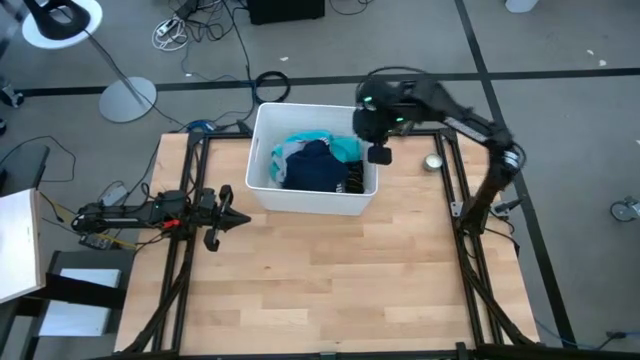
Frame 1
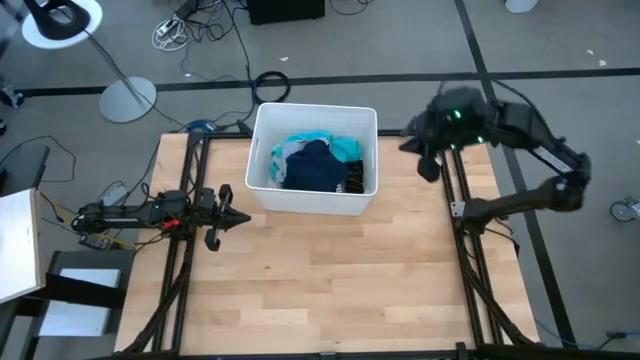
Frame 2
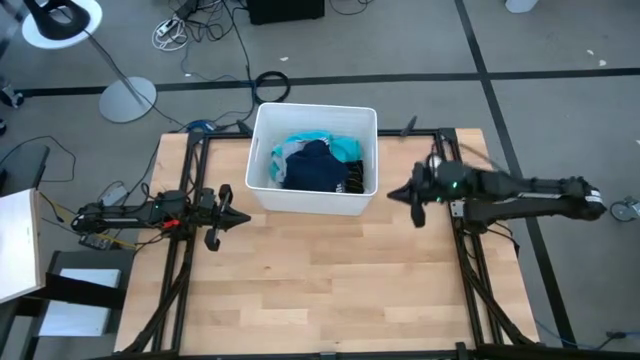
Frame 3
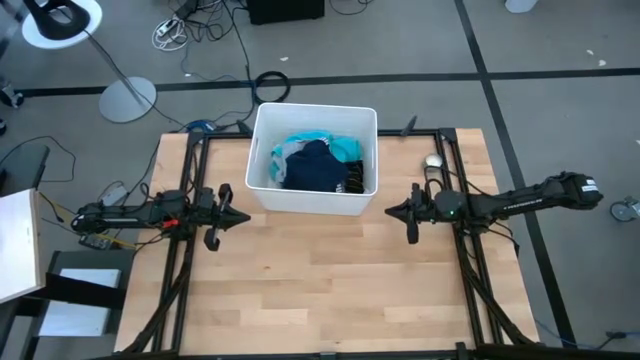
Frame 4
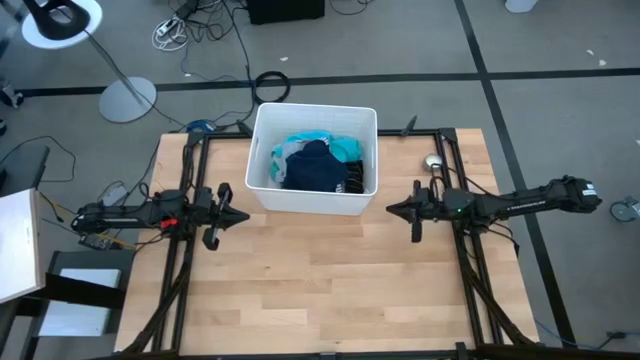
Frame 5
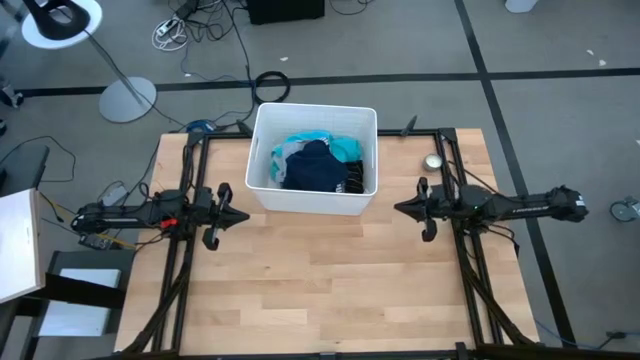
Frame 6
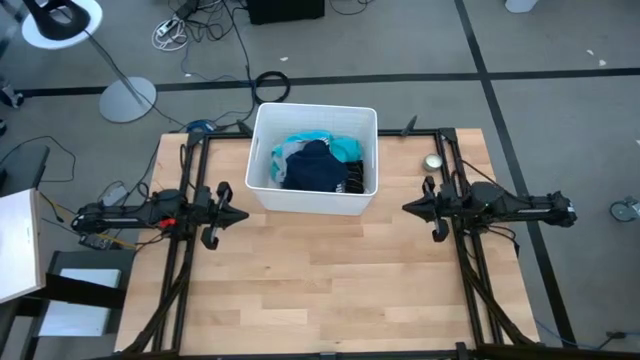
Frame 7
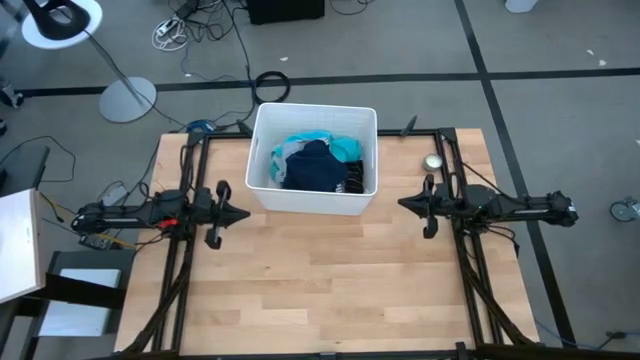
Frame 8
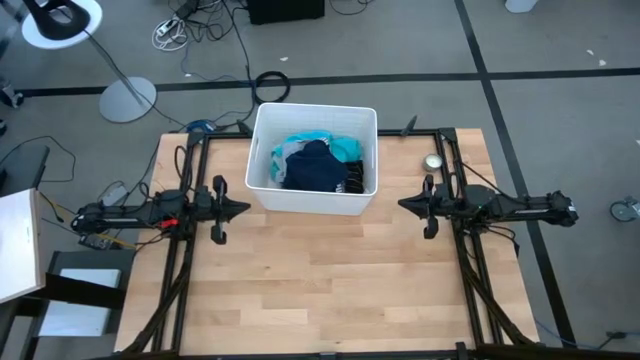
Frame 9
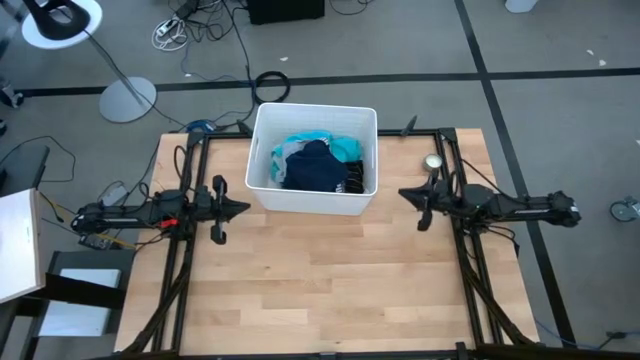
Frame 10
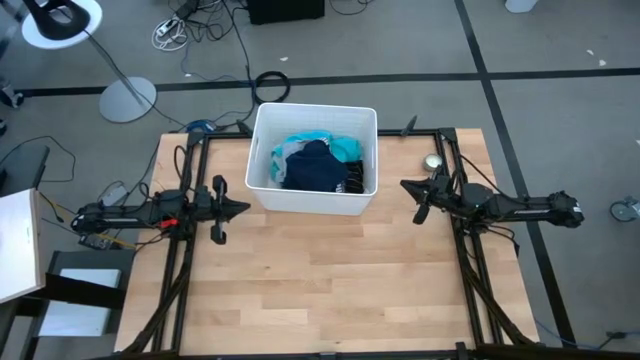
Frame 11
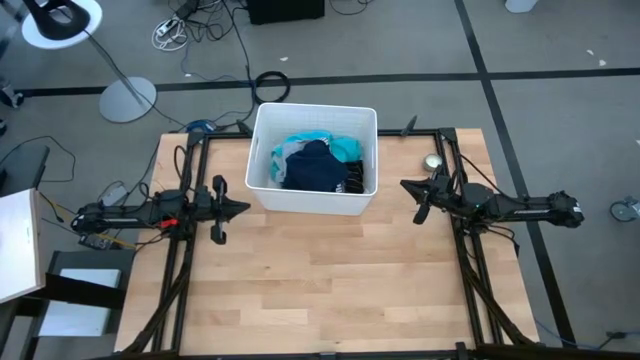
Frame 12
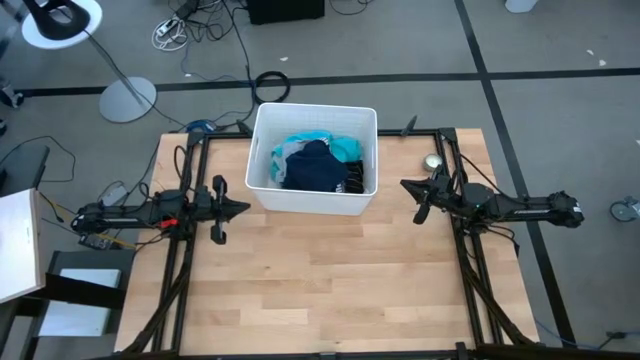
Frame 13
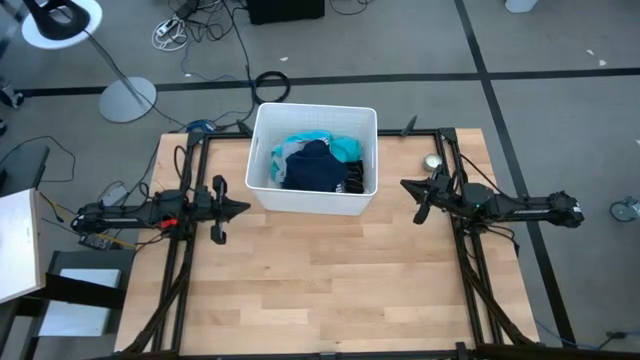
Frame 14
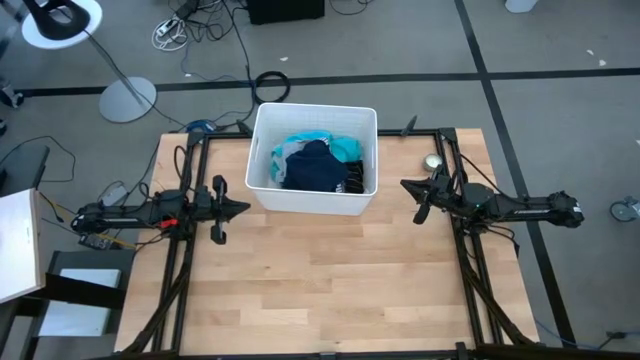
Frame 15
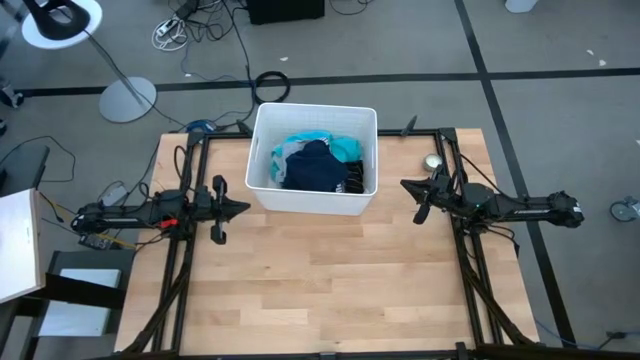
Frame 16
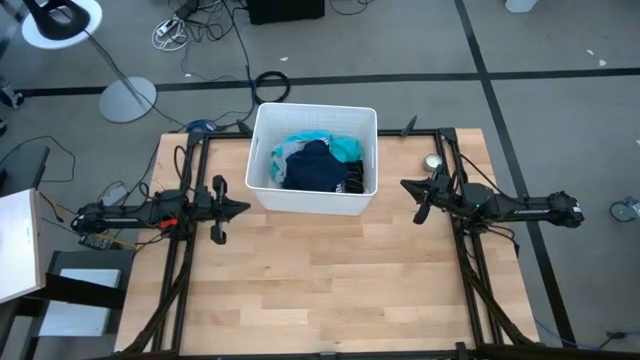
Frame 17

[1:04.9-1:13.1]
Task: Sort clothes
Return to Home Position

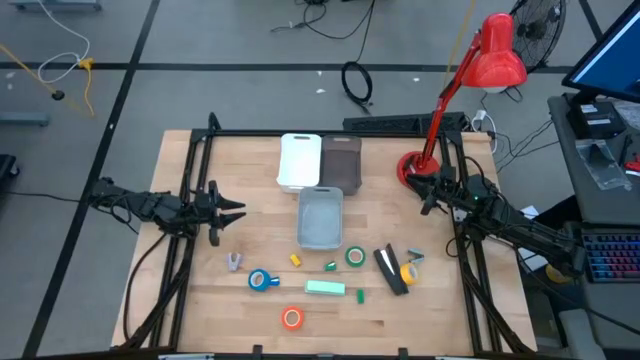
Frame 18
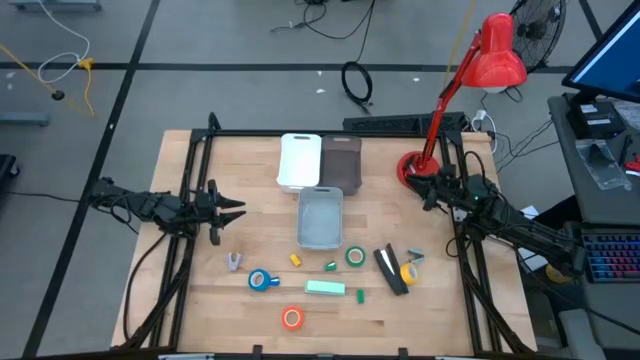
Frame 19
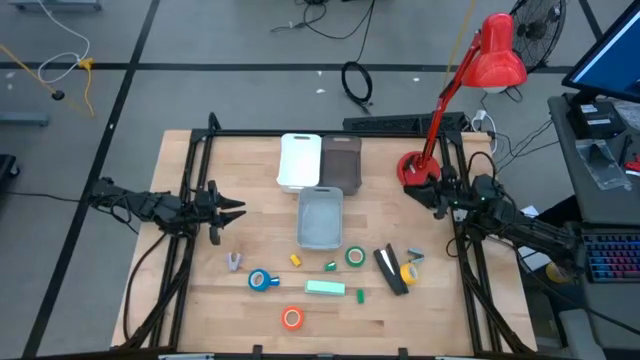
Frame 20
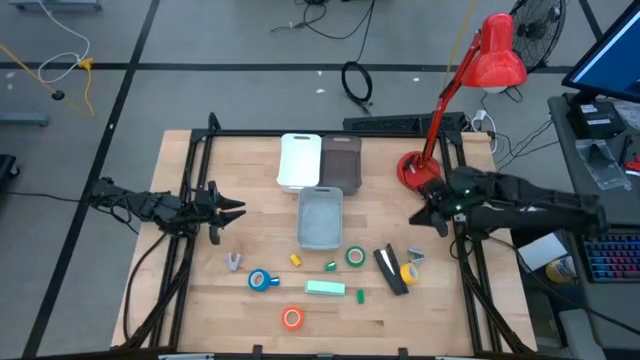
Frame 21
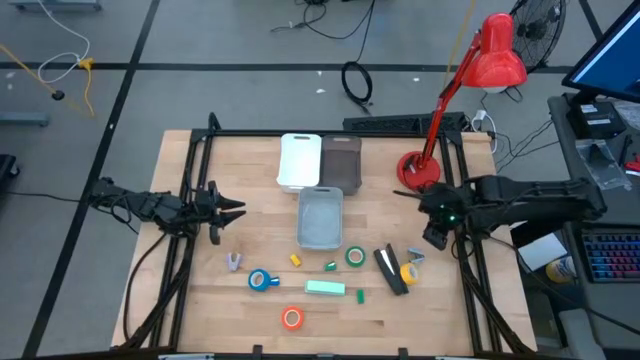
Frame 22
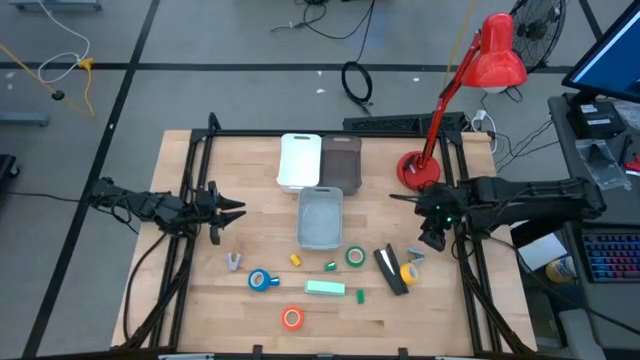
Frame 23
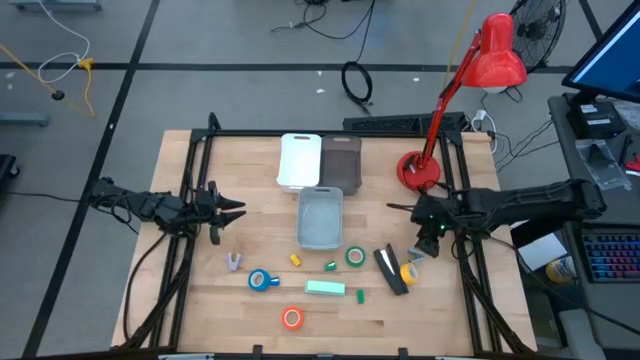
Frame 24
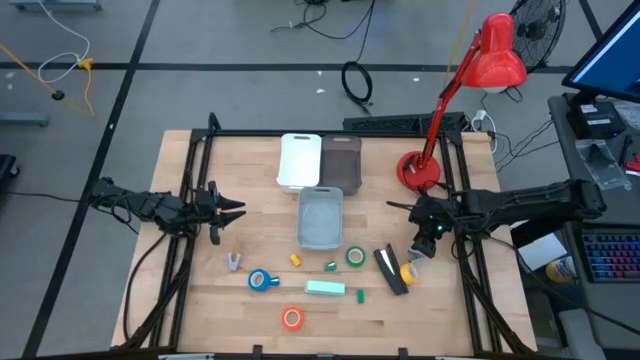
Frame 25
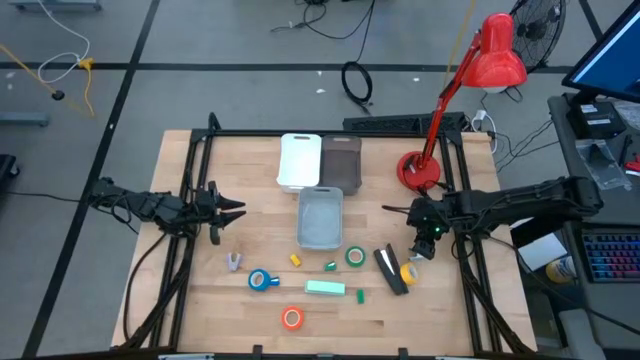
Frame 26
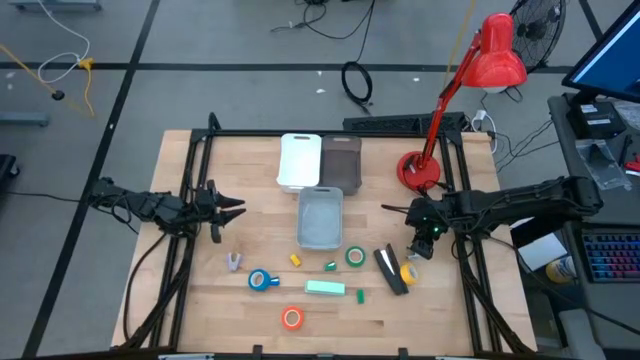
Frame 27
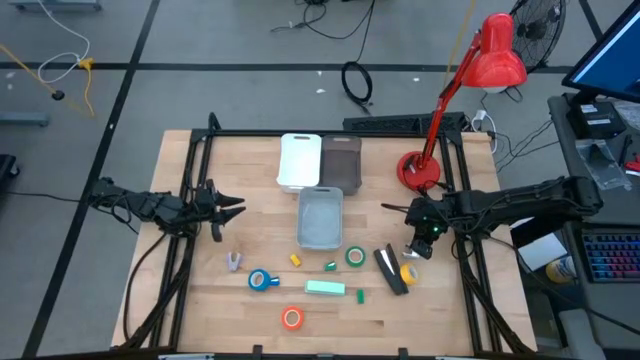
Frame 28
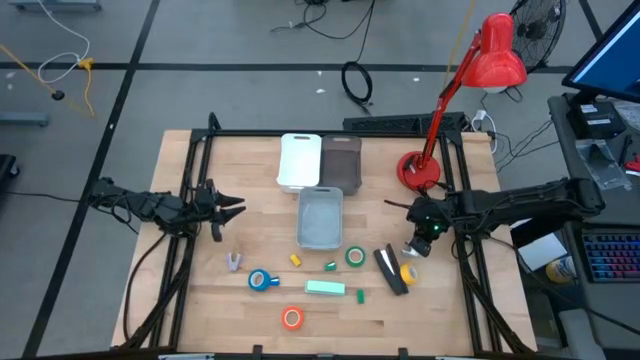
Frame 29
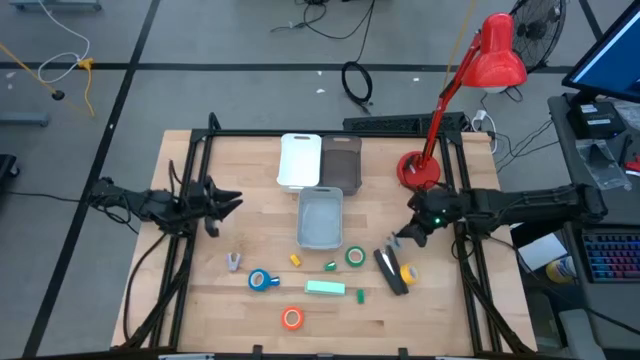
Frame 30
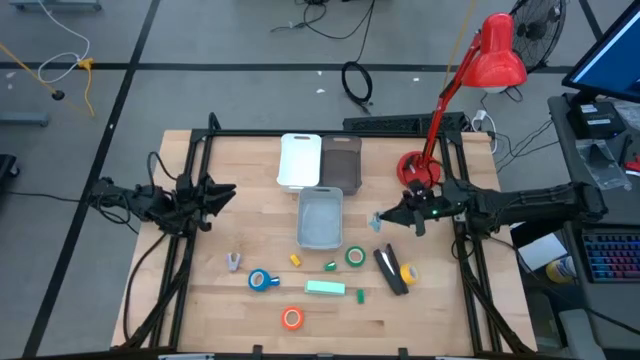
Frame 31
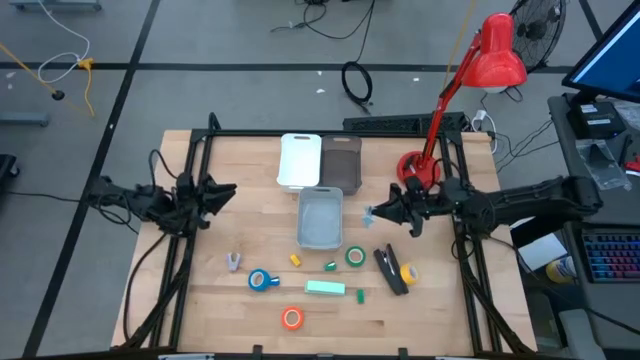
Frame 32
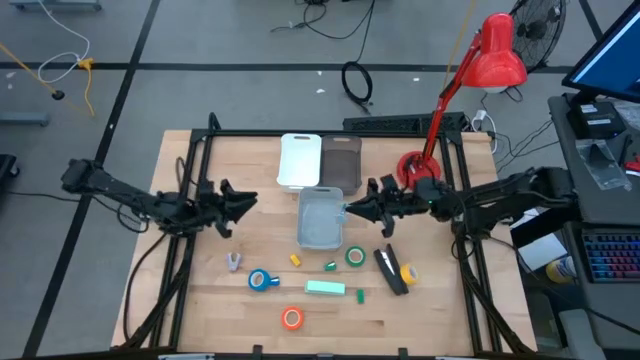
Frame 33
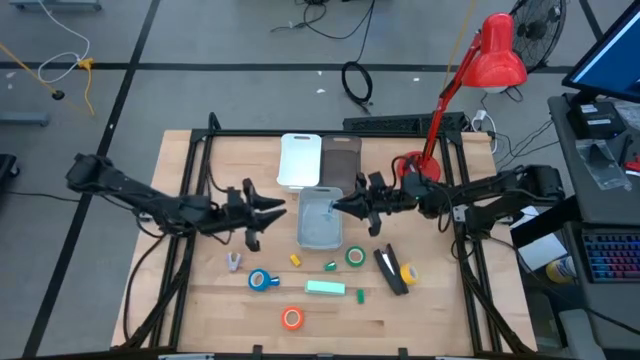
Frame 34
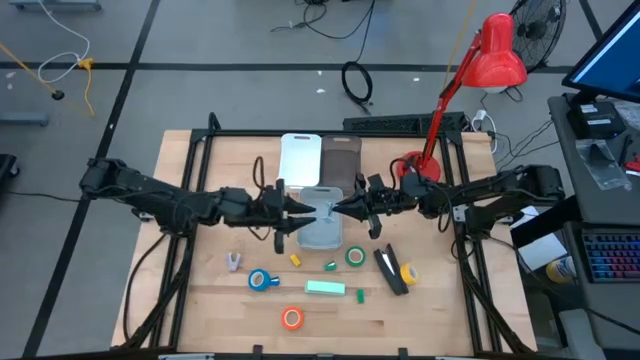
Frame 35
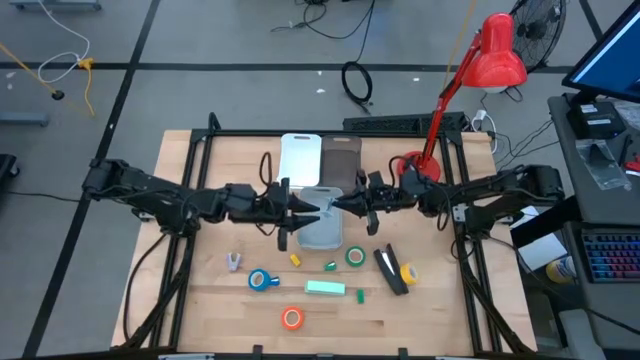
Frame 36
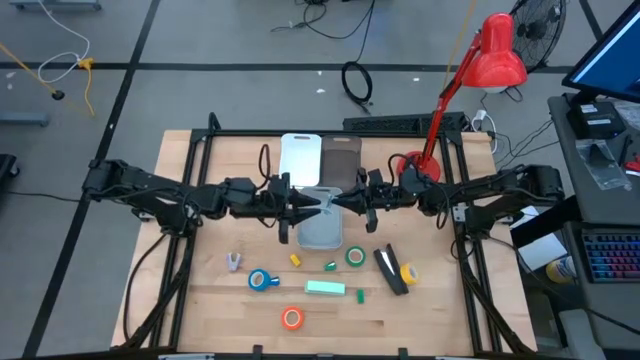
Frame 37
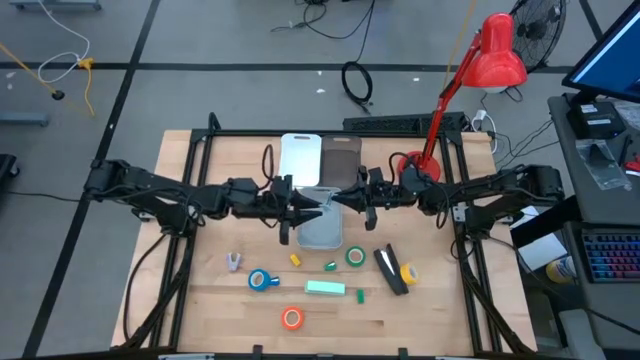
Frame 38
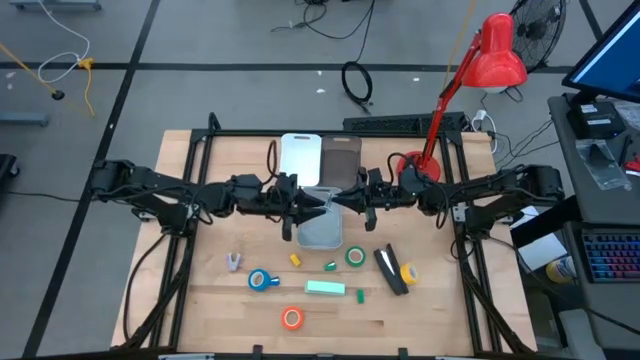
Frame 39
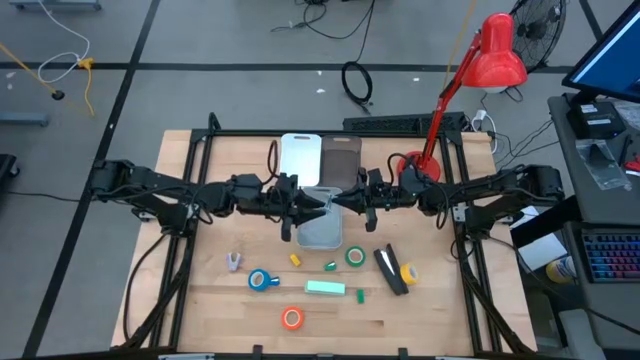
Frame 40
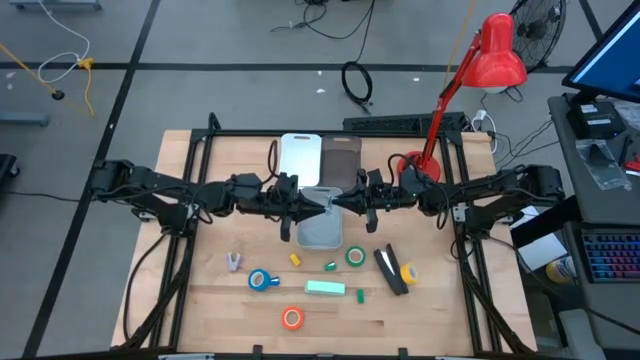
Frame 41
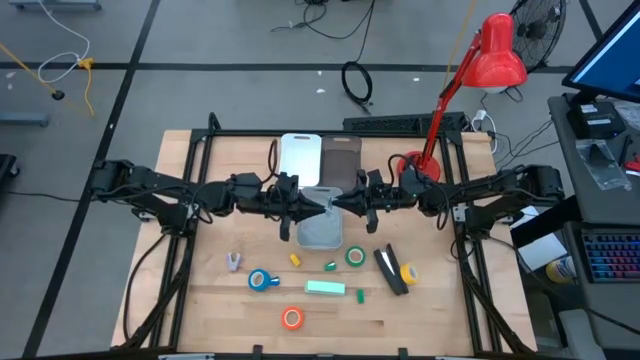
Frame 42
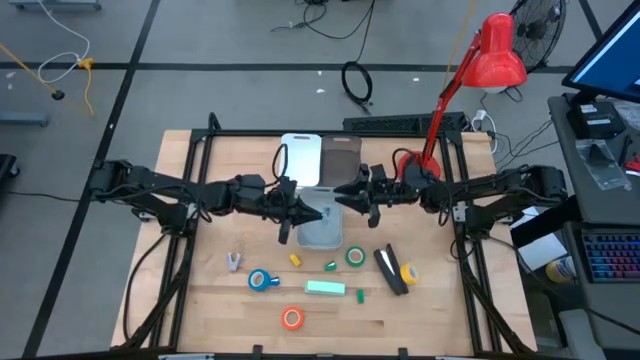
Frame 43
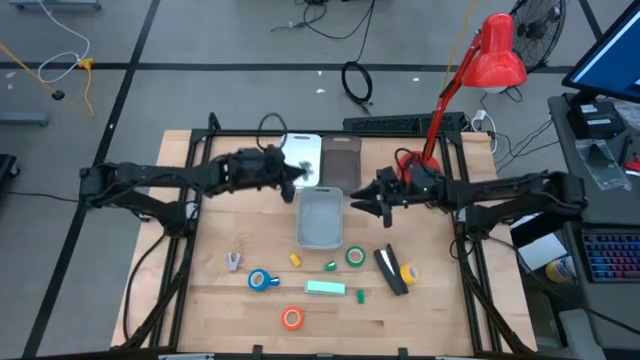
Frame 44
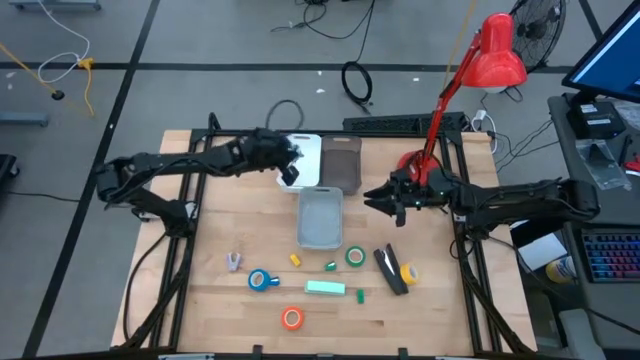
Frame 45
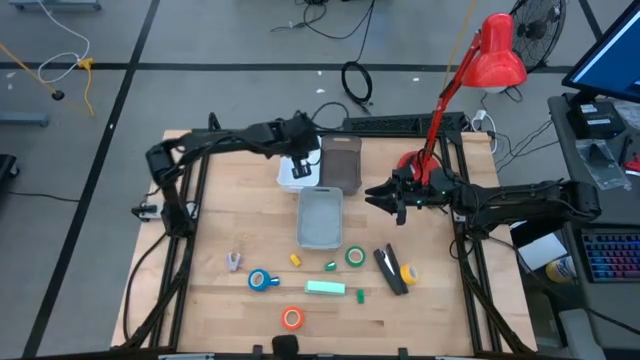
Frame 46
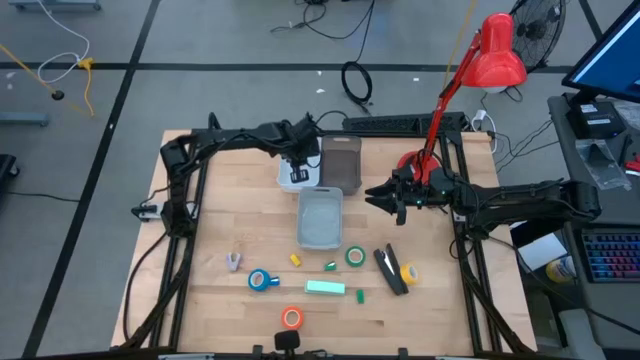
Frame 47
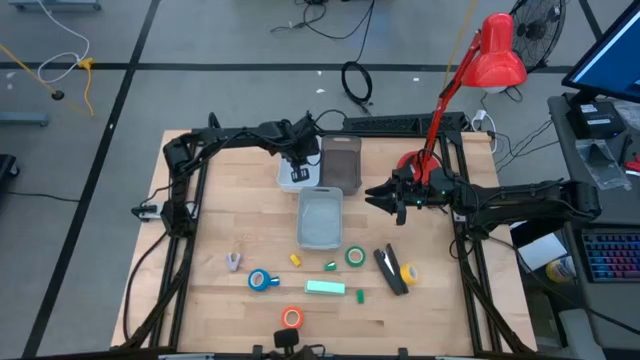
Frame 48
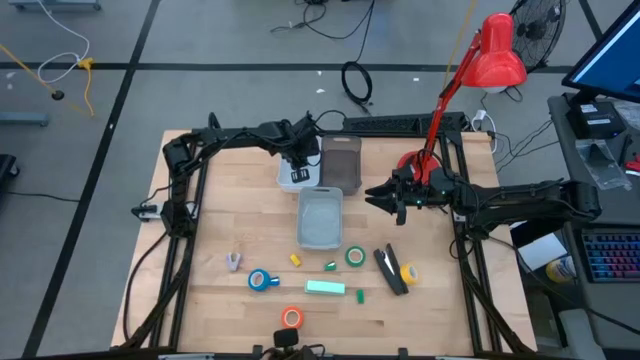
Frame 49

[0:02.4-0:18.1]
Task: Pick and place Stapler, Stapler remover, tape
Put the sky blue staple remover into the white bin
